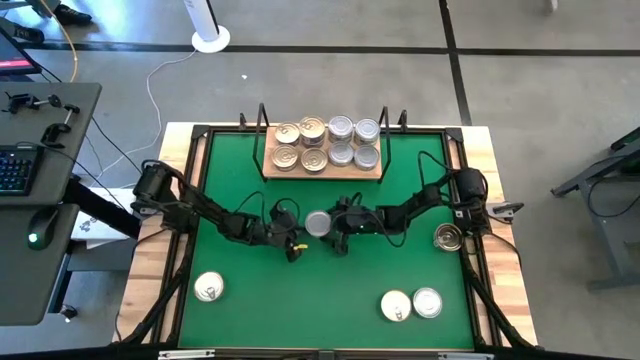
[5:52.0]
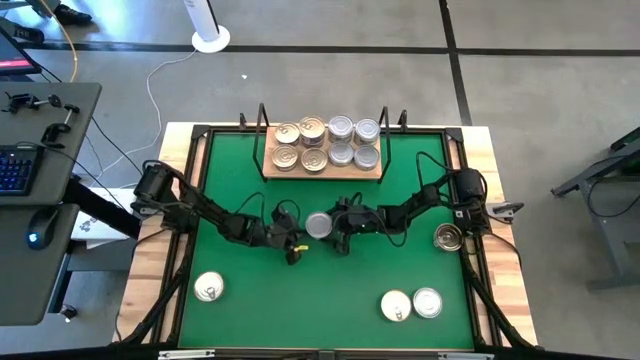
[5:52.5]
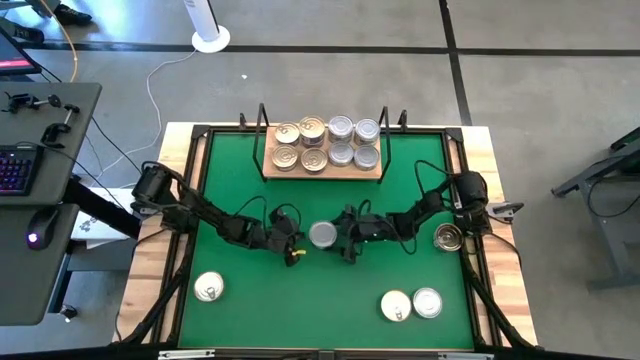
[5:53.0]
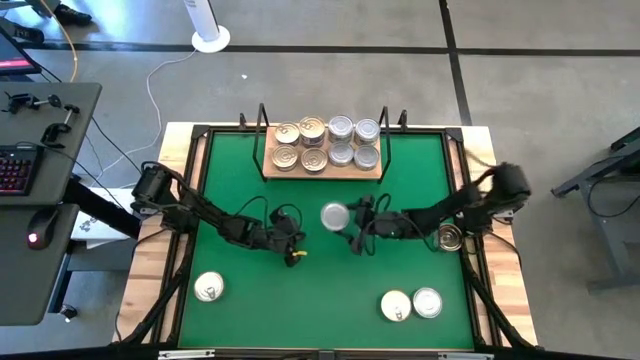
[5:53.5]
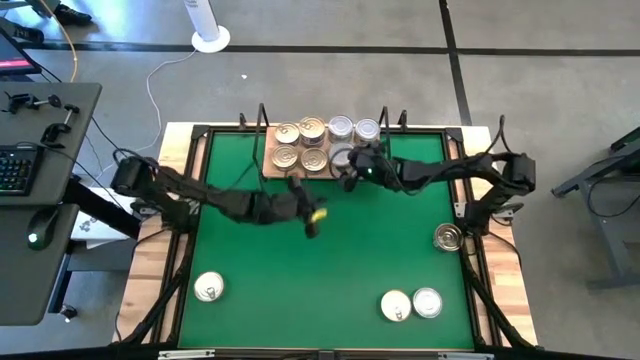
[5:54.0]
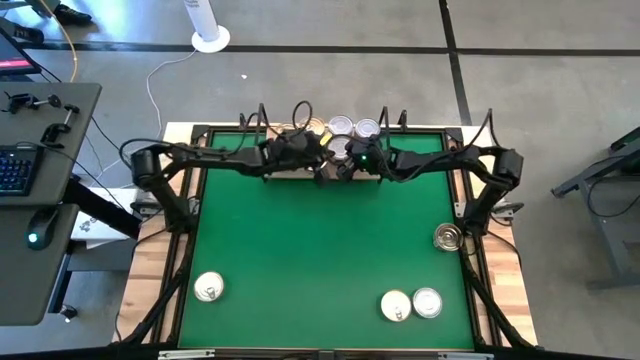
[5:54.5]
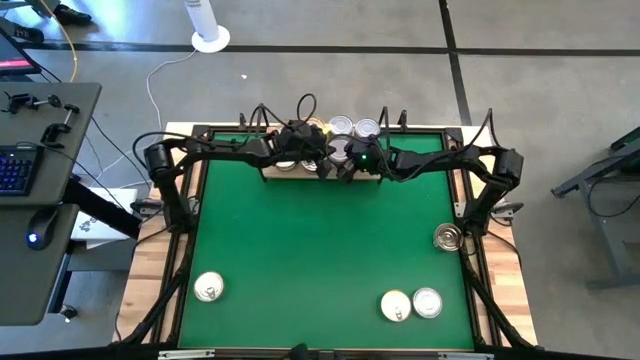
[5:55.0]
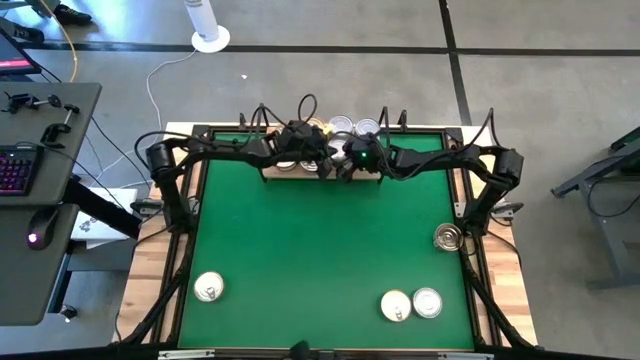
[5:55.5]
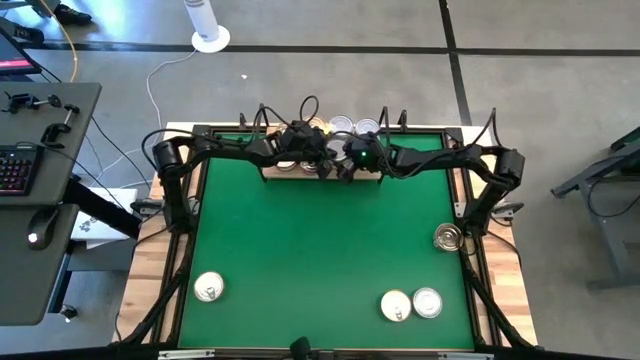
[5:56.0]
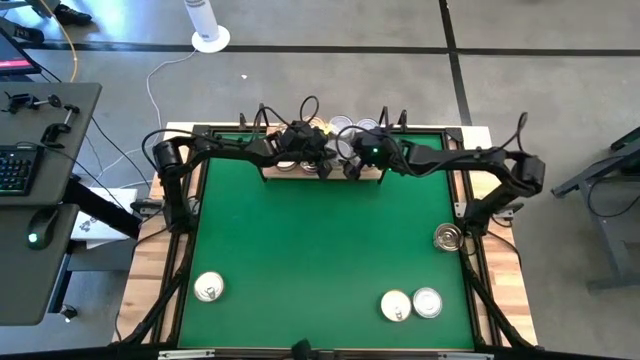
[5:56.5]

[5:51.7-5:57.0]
Task: Stack canned seafood by type on shelf
Stack the green tuna can on top of the other green tuna can on the shelf

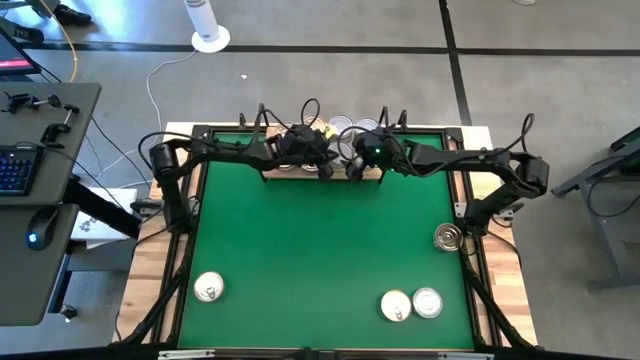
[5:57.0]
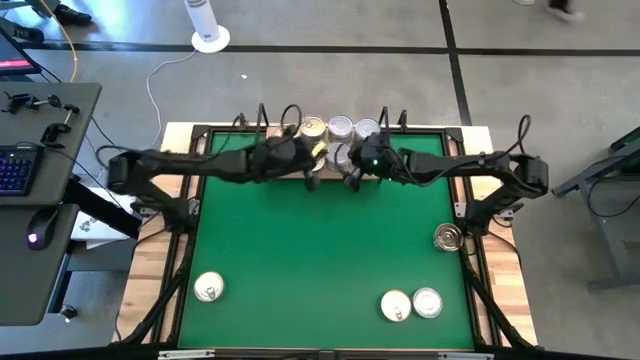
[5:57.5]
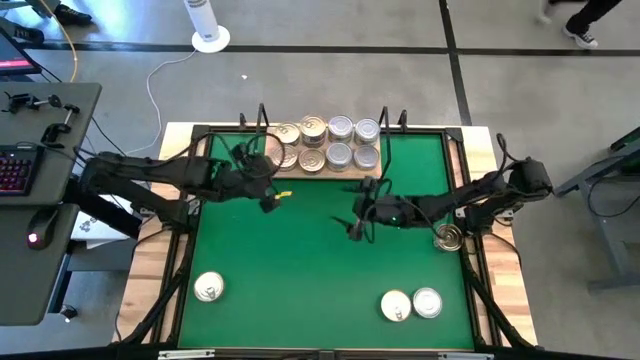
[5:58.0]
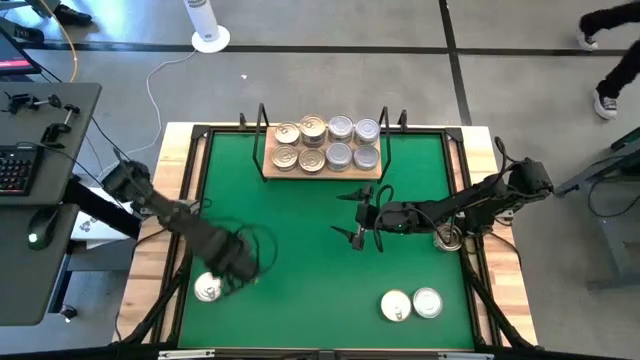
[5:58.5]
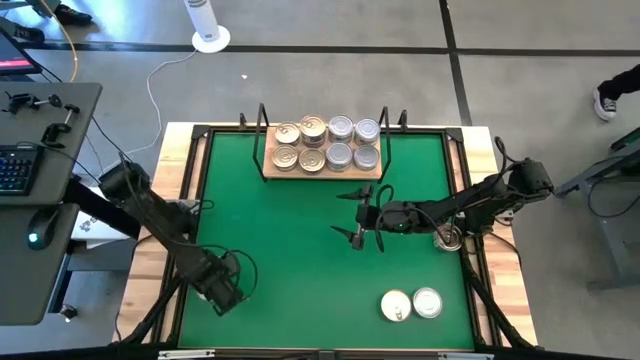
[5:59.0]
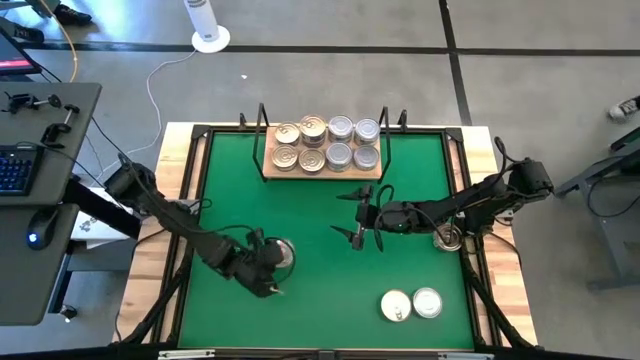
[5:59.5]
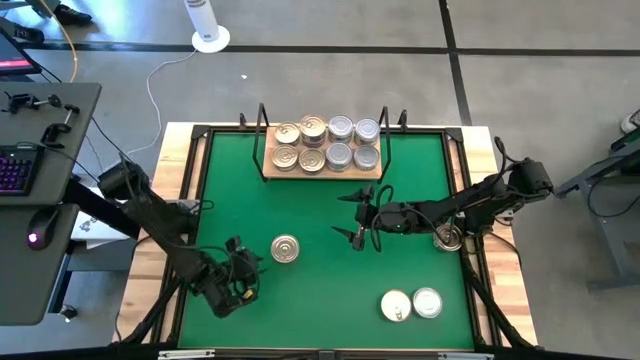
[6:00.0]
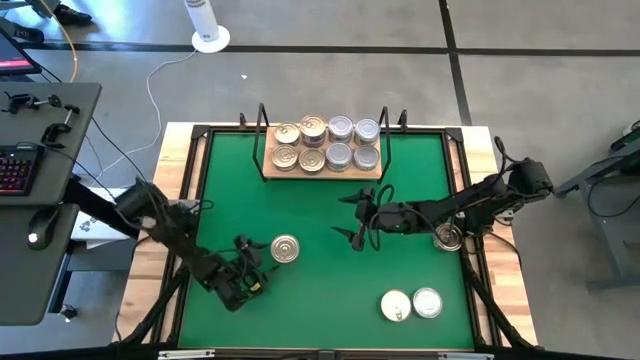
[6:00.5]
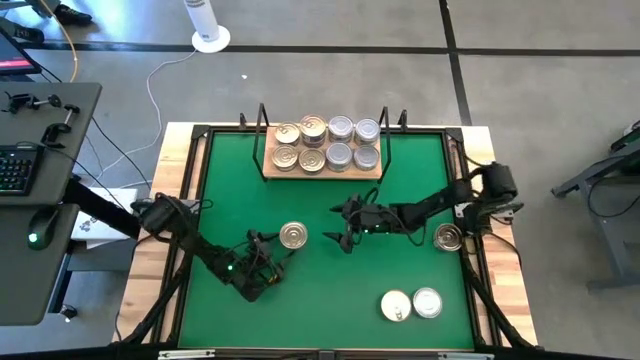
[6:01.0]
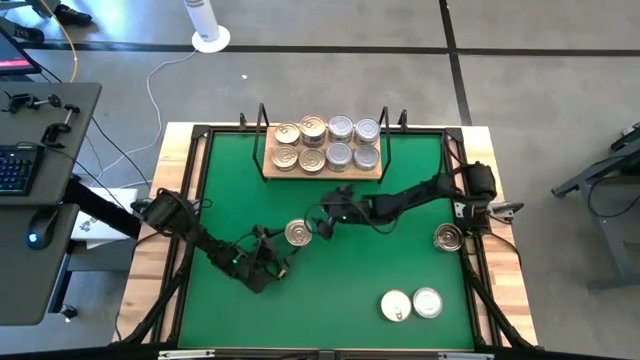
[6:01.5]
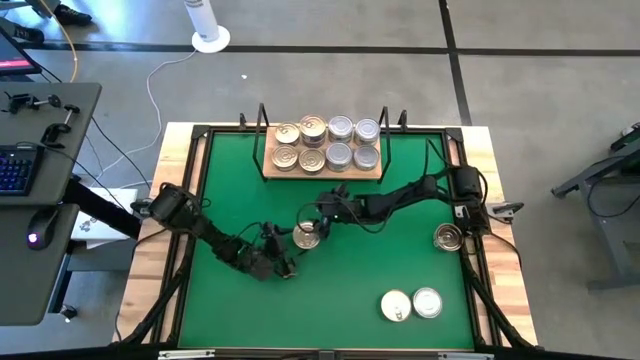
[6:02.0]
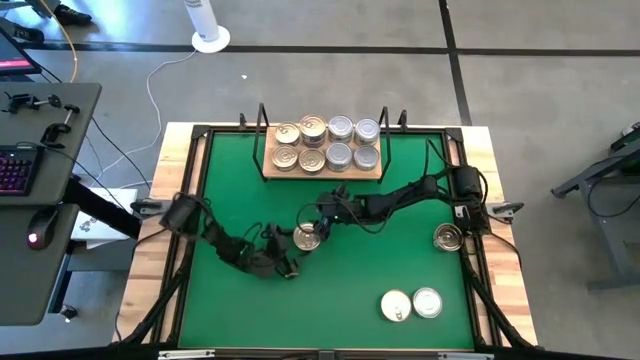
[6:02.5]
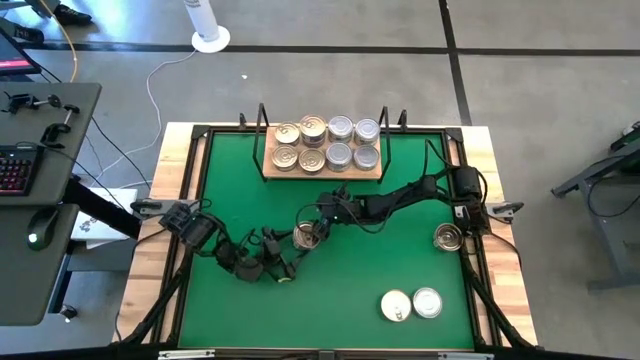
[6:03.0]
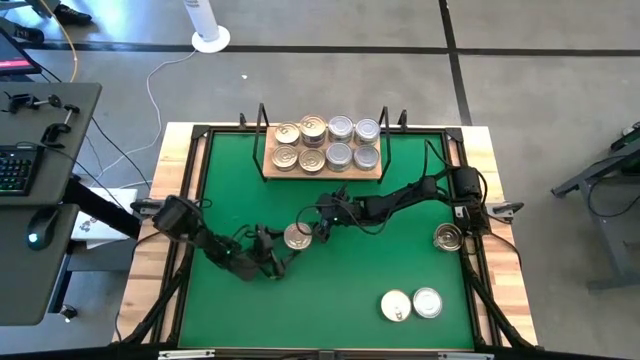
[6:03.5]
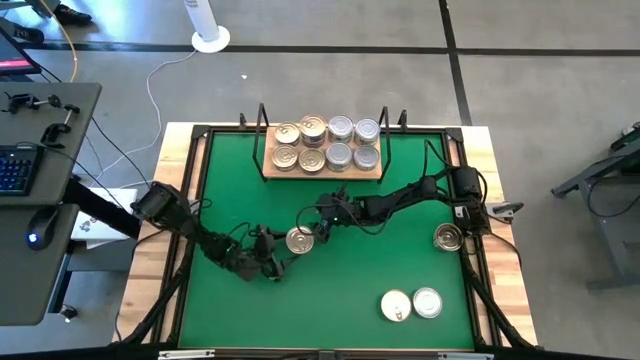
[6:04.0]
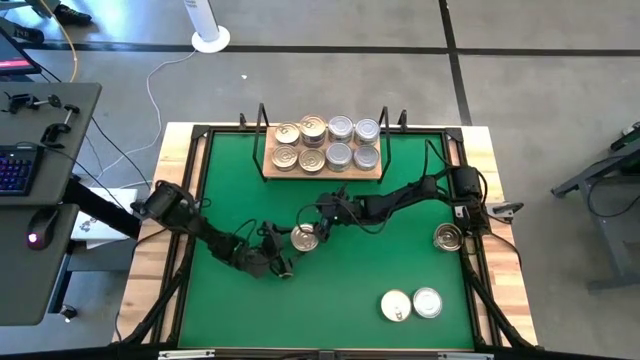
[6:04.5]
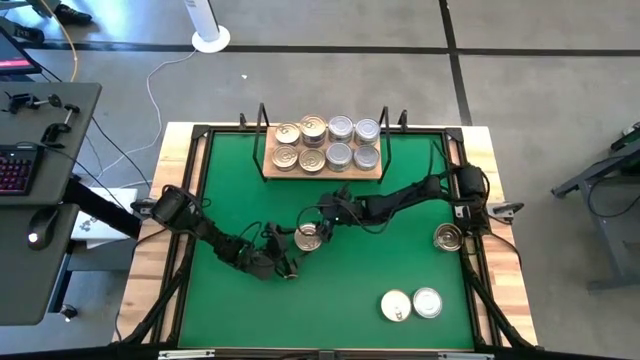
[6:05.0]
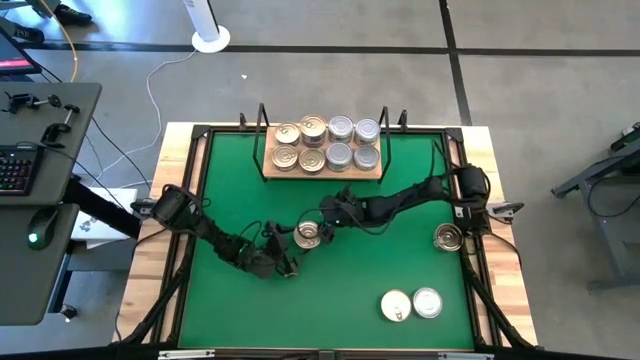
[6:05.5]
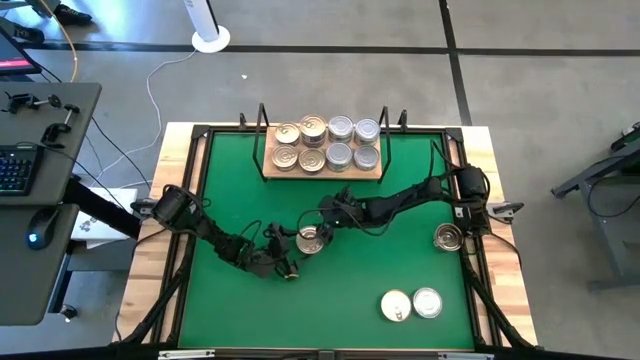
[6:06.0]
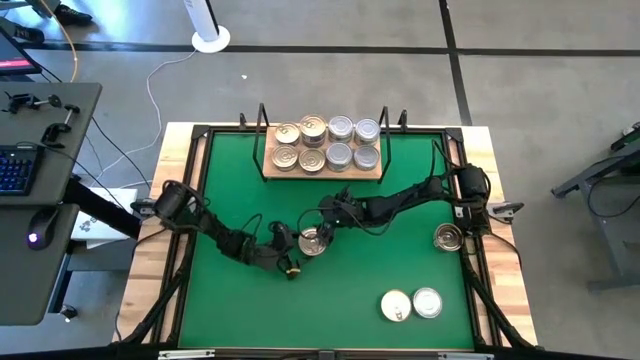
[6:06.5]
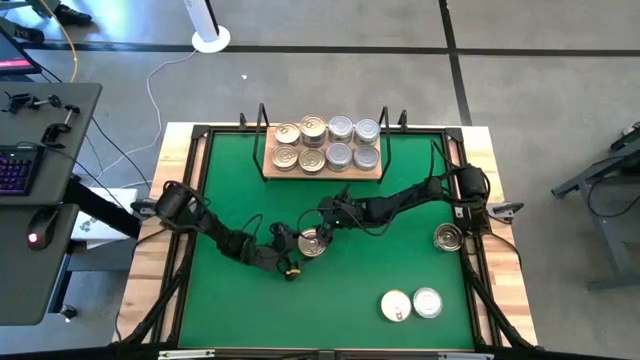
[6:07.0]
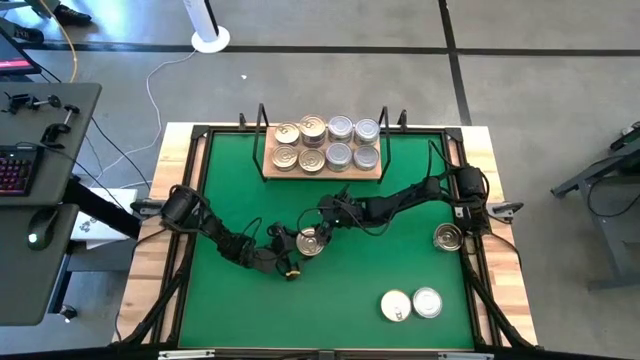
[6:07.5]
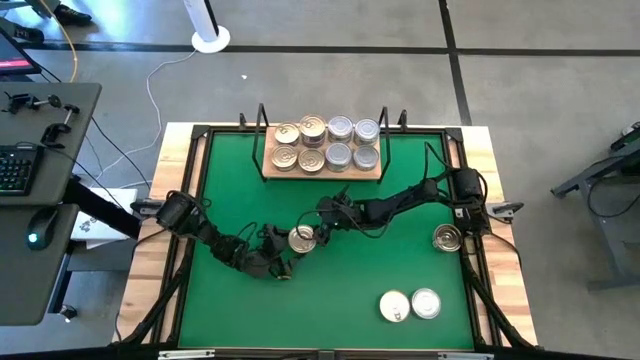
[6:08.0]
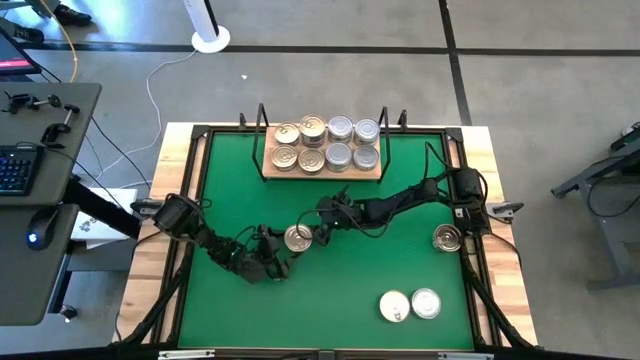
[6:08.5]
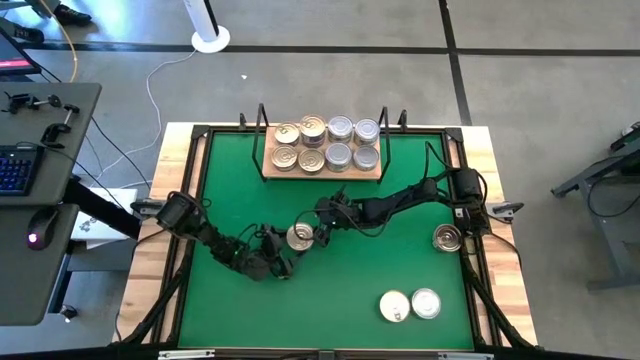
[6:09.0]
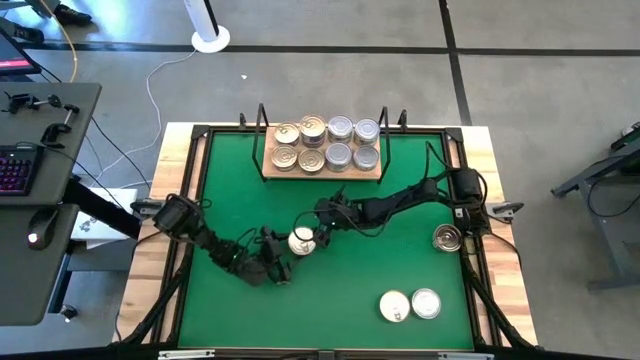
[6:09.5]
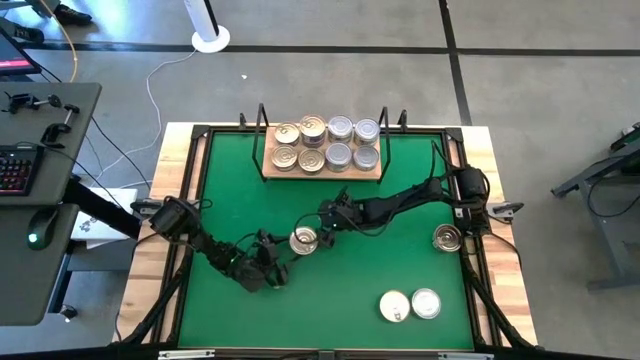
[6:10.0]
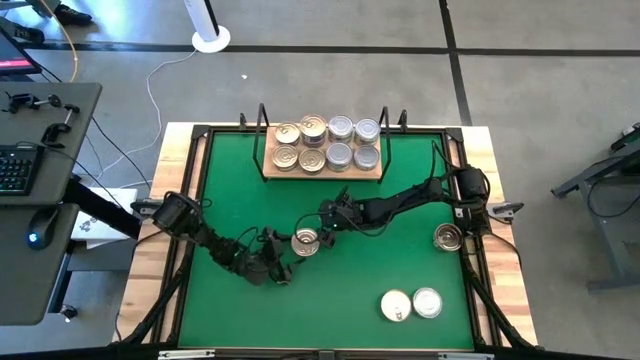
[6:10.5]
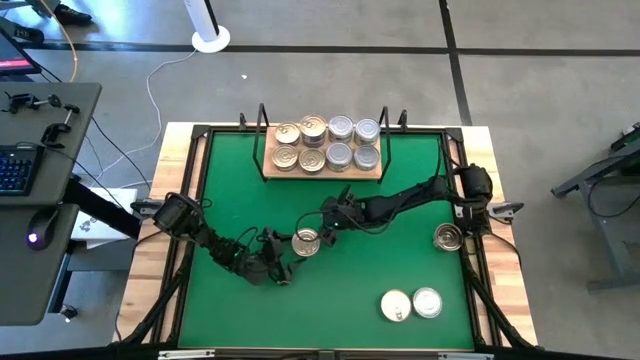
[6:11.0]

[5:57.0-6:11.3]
Stack the blue/pink tuna can on top of the other blue/pink tuna can on the shelf

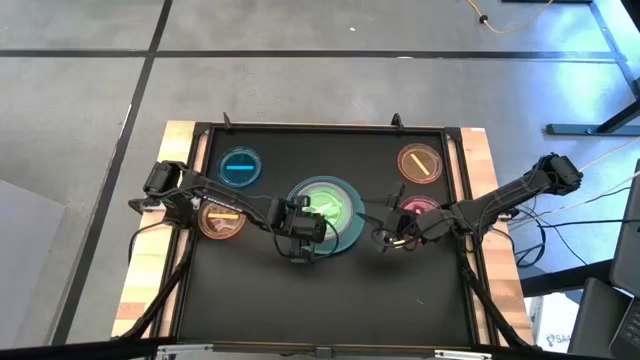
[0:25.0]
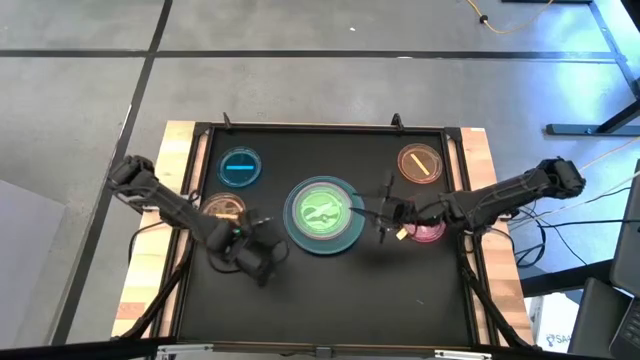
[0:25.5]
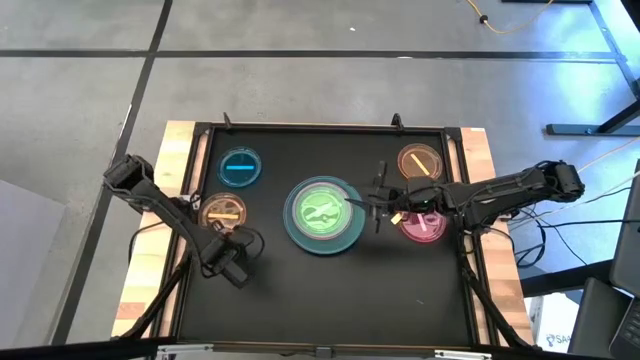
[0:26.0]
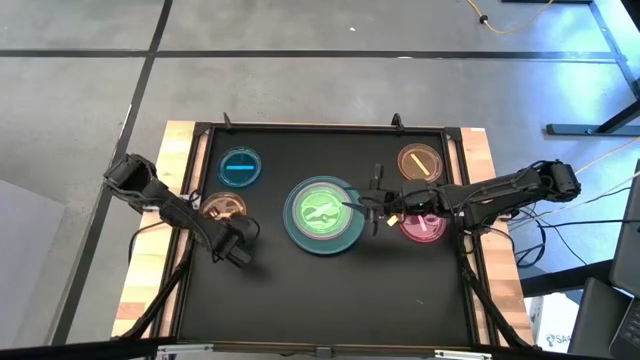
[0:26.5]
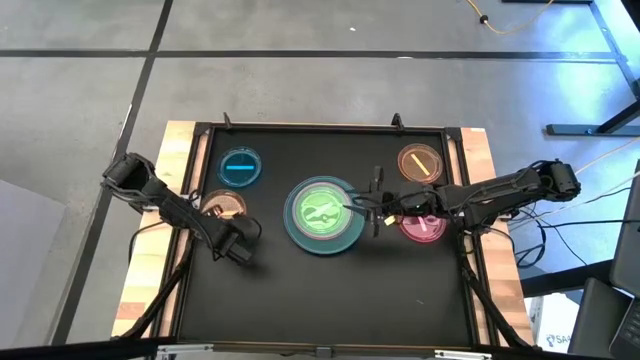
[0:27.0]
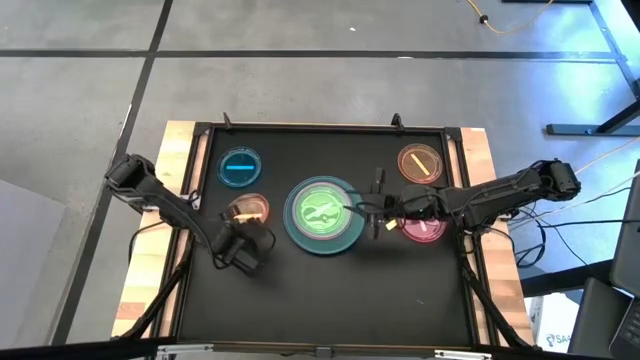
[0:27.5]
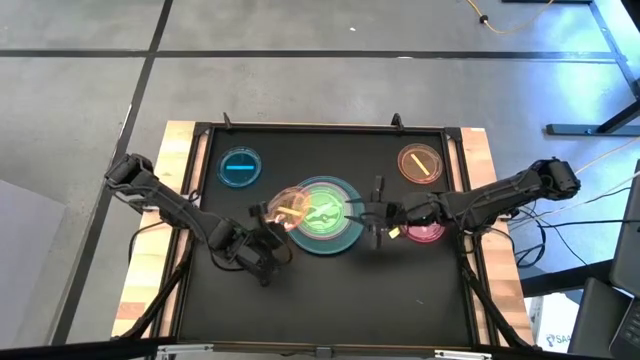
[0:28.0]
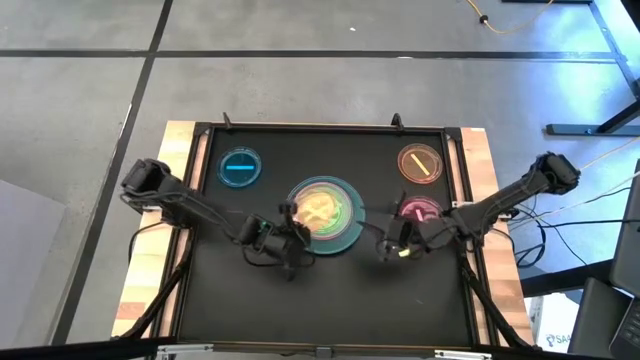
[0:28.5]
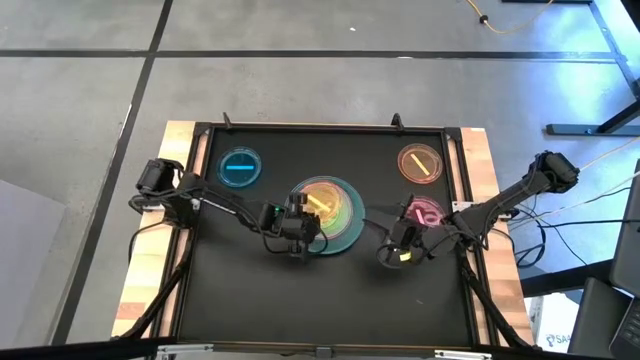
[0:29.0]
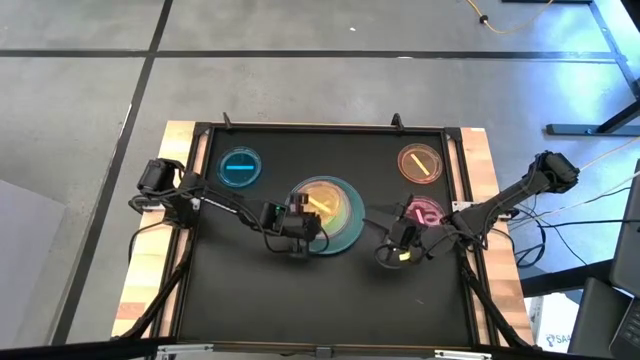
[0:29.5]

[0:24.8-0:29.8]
Task: Stack plastic plates
Stack the left transparent orange plate on top of the transparent green plate
